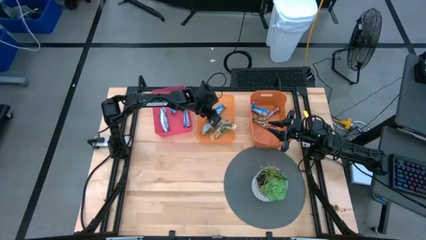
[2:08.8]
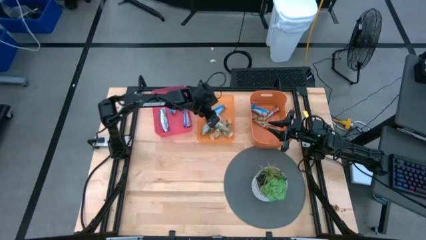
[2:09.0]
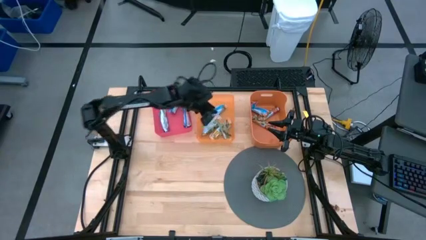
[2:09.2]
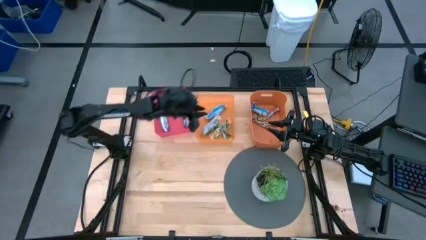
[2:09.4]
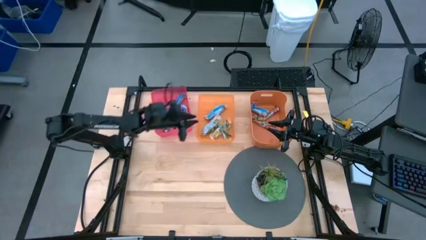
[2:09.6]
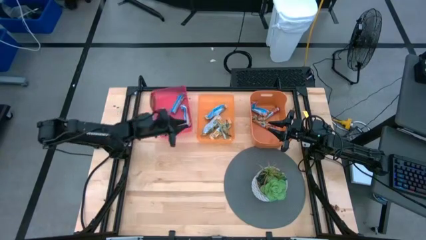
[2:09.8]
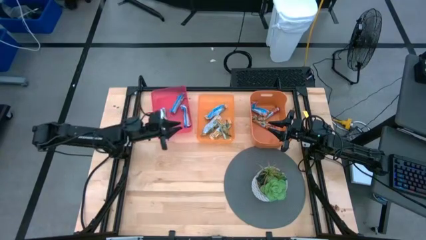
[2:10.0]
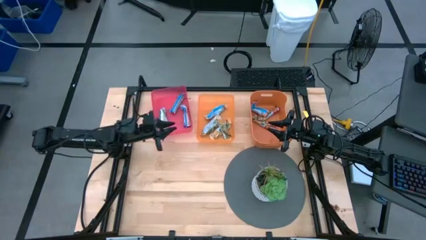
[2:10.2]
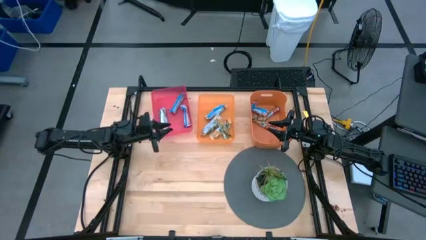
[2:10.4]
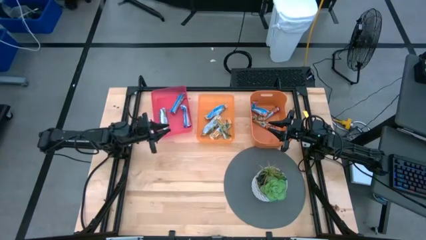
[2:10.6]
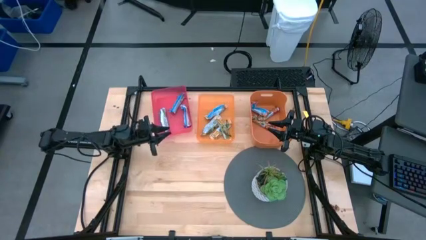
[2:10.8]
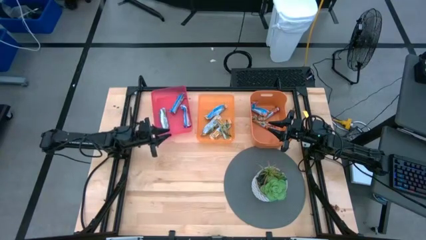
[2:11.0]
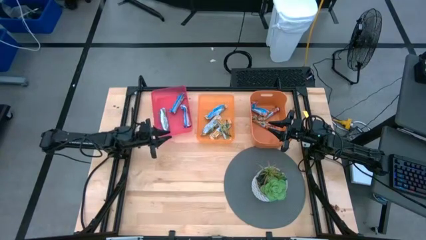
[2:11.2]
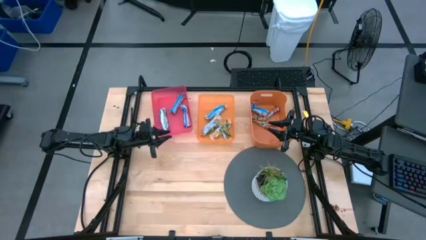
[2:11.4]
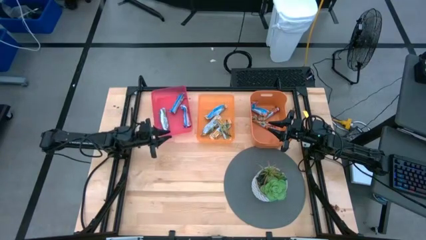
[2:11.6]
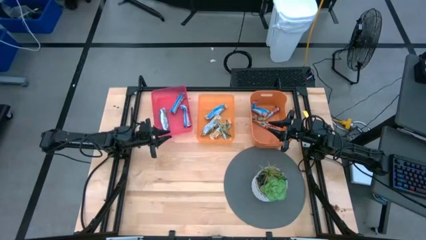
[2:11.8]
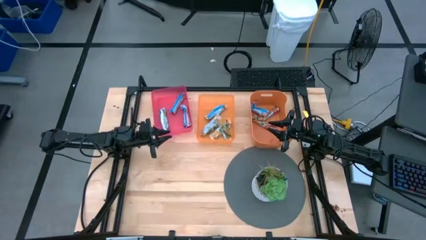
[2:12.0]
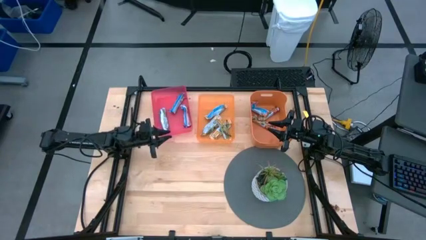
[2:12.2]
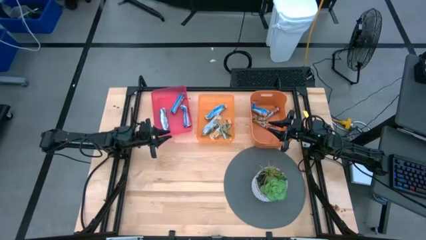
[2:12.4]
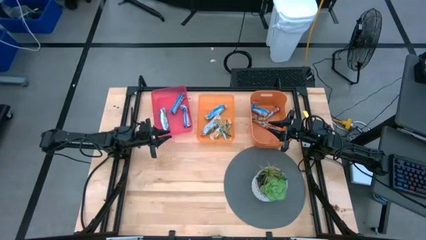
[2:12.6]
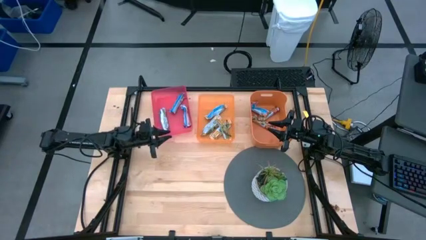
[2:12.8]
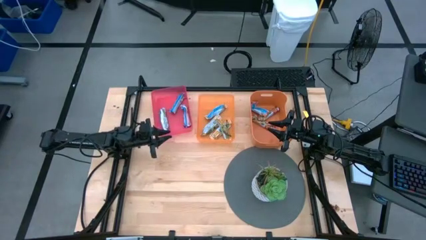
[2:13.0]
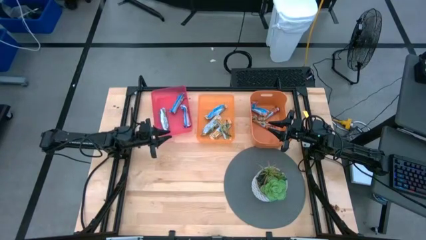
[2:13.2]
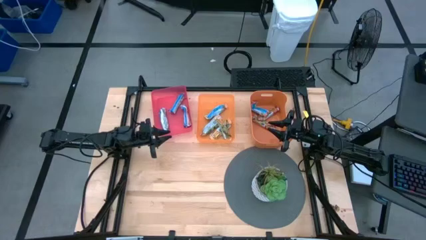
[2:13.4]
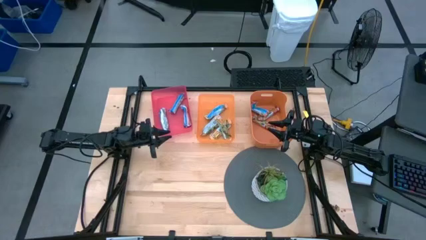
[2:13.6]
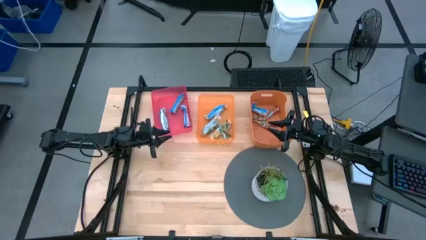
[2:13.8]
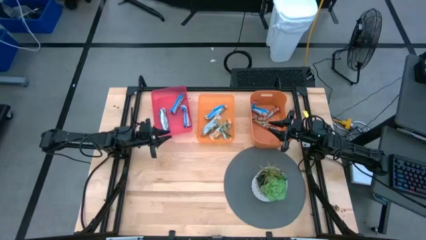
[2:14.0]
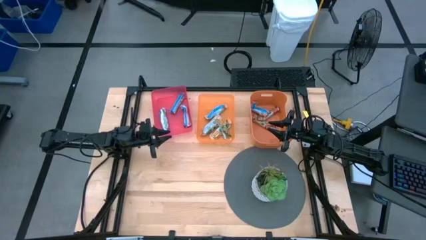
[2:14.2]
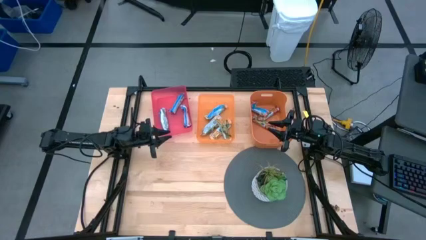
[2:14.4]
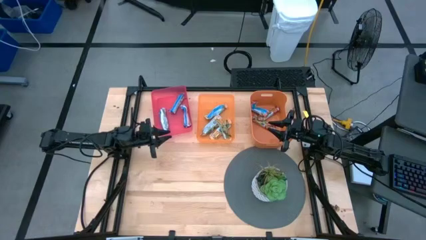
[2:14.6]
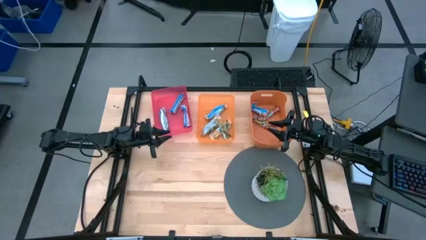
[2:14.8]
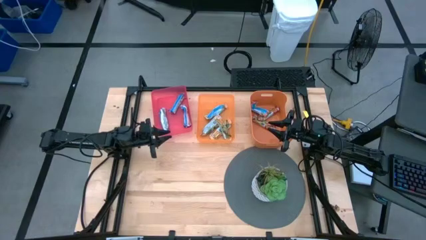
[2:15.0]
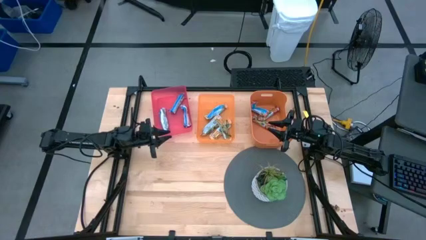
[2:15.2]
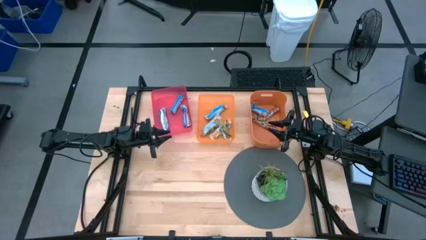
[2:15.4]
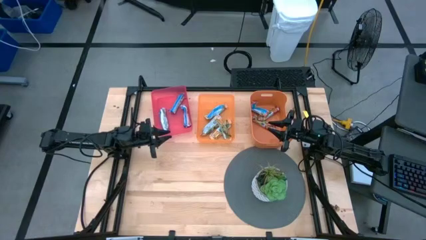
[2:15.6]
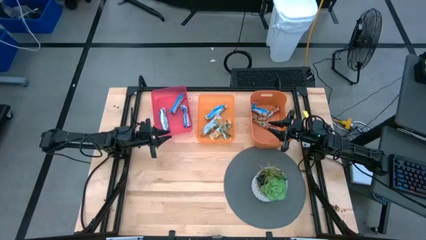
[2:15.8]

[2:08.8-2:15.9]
Task: Pick and place Granola Bars by type
Return to Home Position

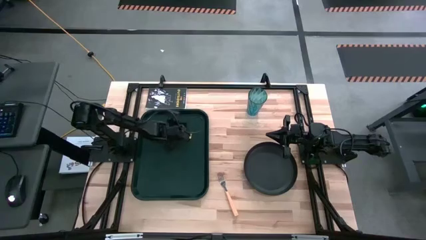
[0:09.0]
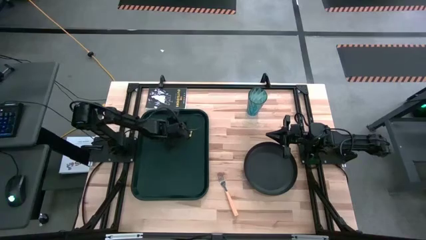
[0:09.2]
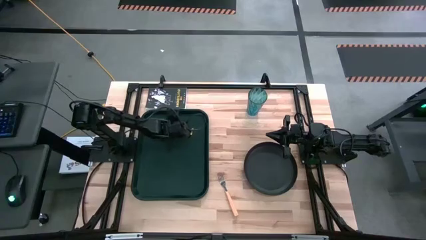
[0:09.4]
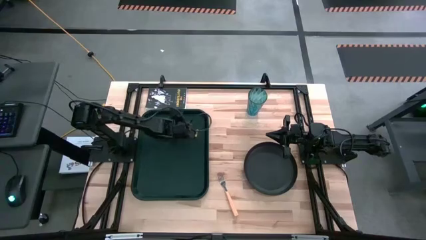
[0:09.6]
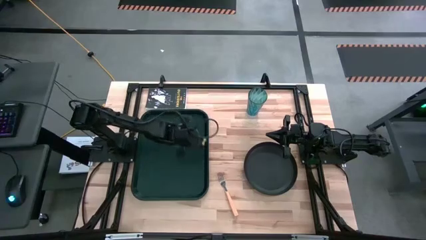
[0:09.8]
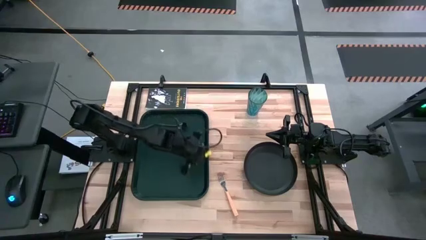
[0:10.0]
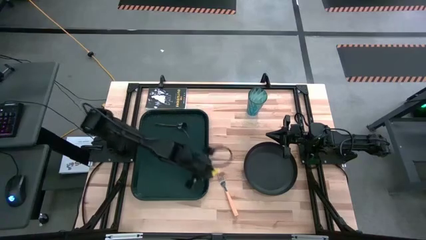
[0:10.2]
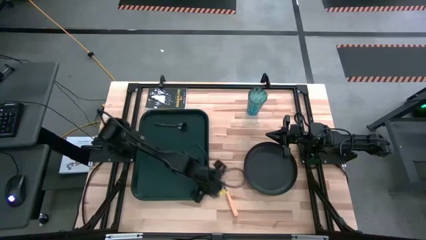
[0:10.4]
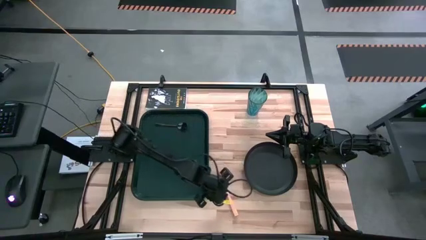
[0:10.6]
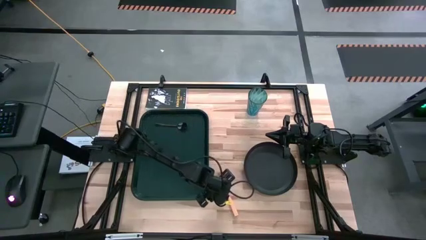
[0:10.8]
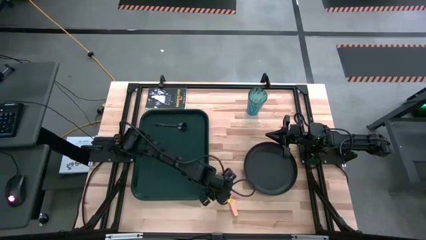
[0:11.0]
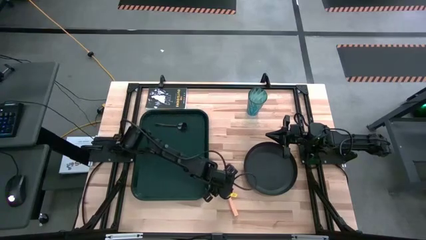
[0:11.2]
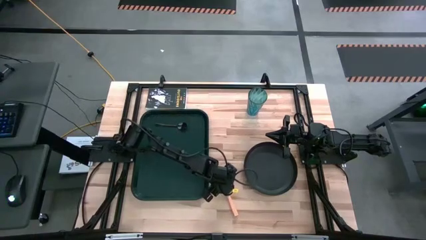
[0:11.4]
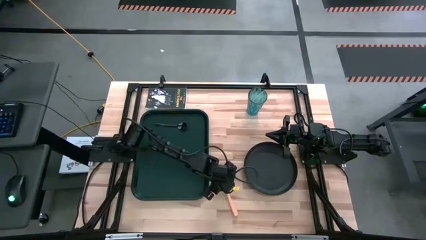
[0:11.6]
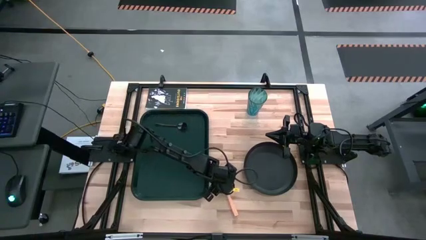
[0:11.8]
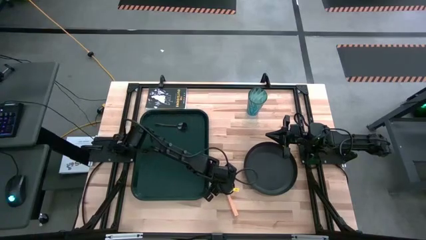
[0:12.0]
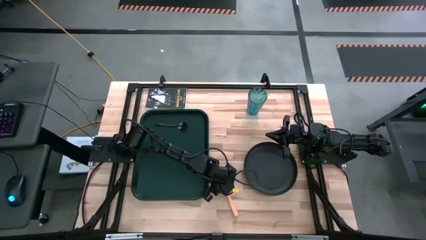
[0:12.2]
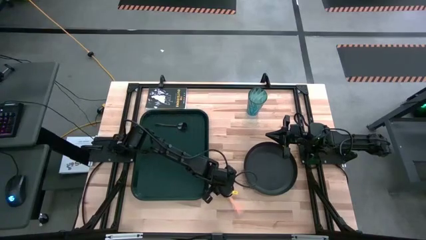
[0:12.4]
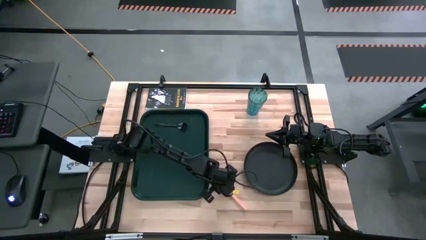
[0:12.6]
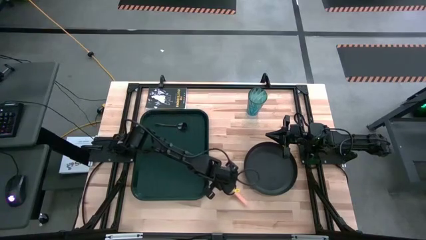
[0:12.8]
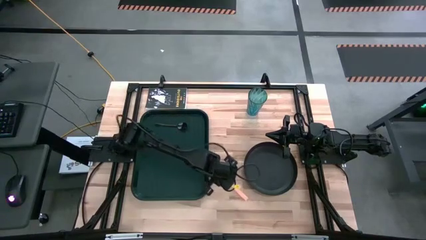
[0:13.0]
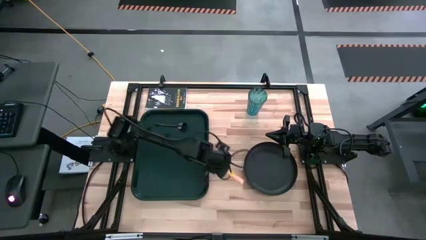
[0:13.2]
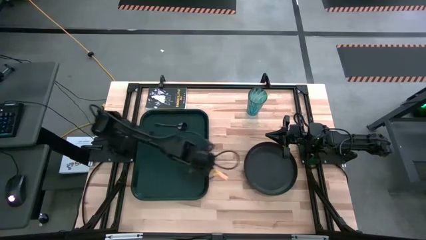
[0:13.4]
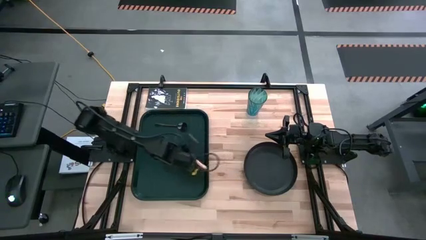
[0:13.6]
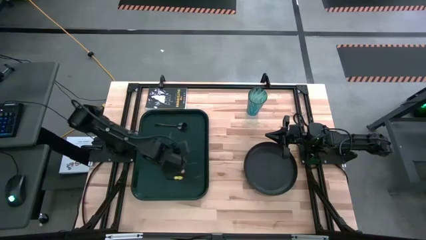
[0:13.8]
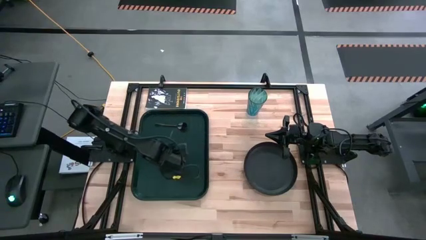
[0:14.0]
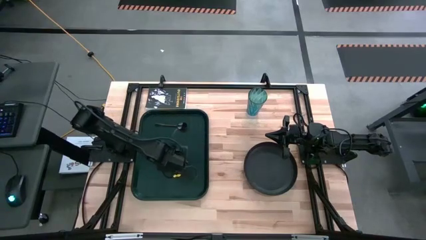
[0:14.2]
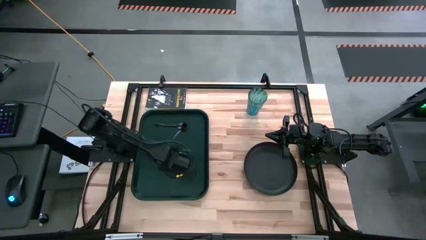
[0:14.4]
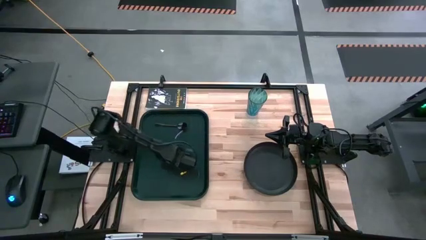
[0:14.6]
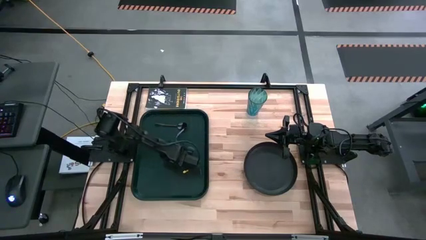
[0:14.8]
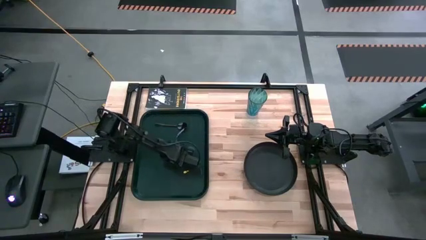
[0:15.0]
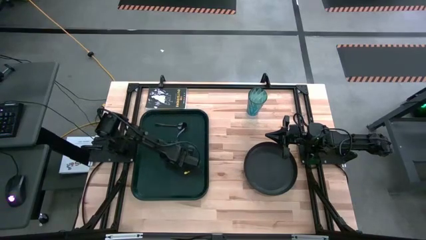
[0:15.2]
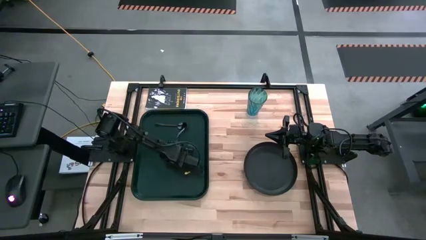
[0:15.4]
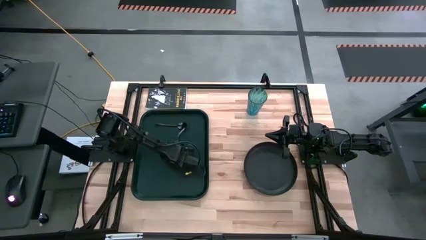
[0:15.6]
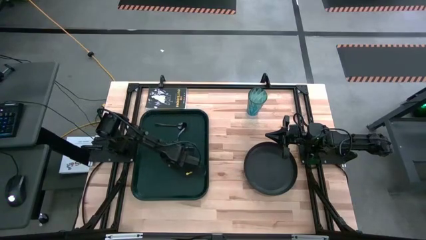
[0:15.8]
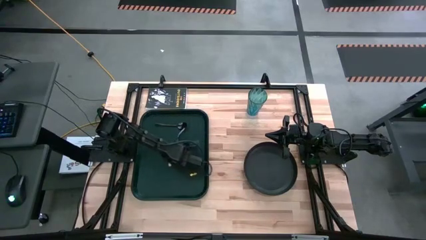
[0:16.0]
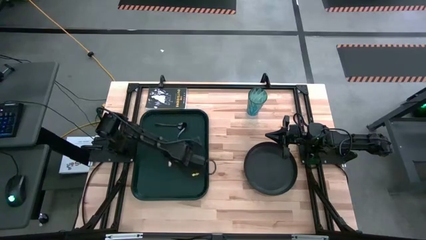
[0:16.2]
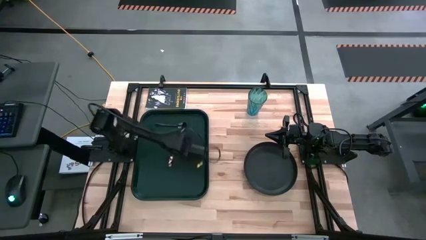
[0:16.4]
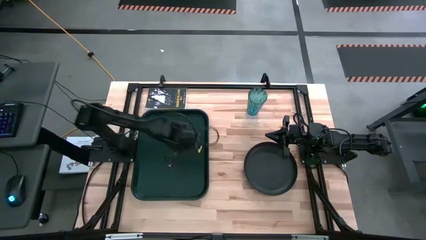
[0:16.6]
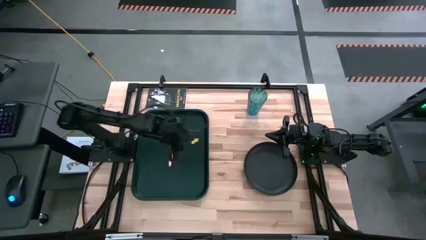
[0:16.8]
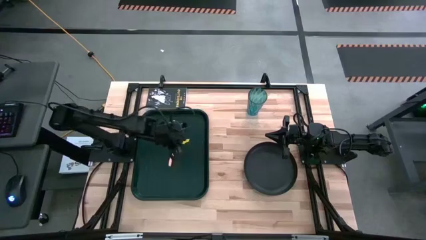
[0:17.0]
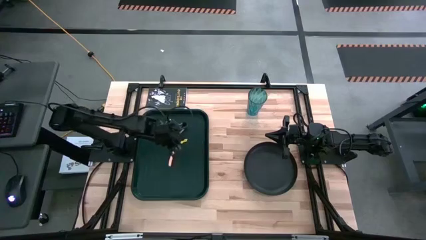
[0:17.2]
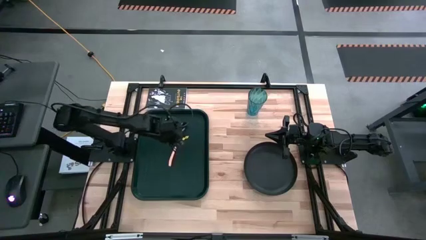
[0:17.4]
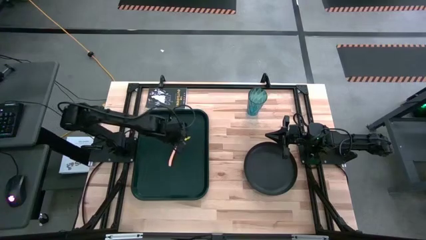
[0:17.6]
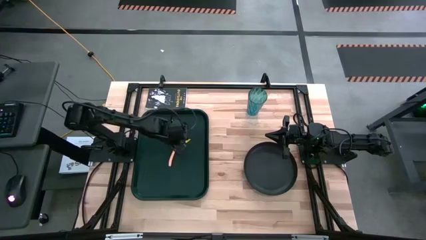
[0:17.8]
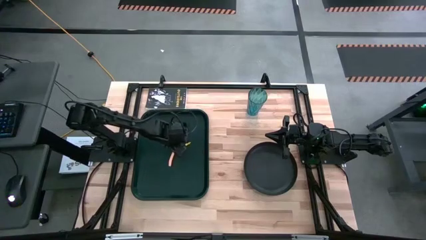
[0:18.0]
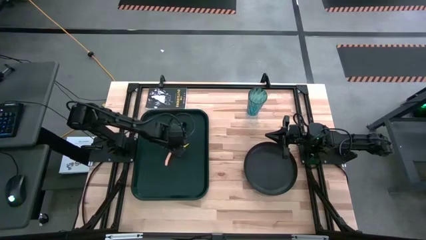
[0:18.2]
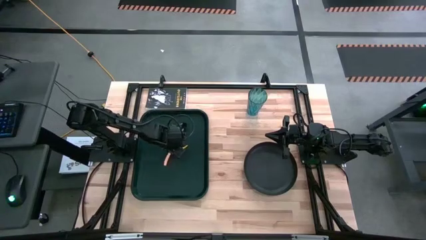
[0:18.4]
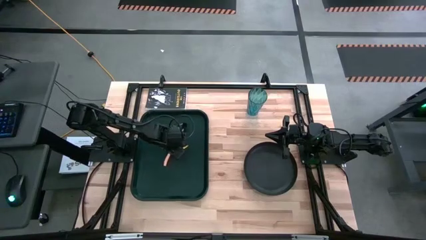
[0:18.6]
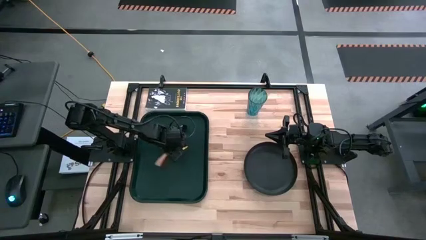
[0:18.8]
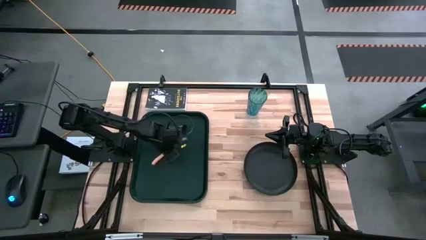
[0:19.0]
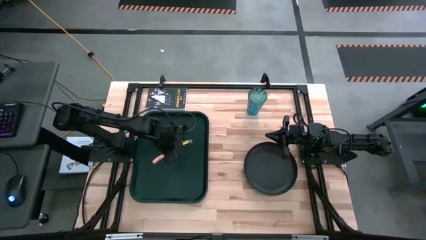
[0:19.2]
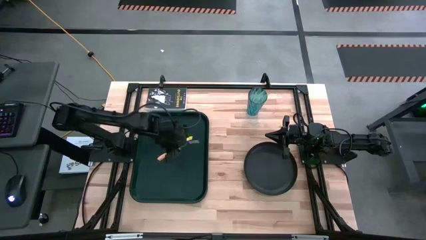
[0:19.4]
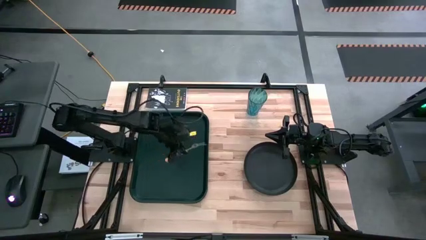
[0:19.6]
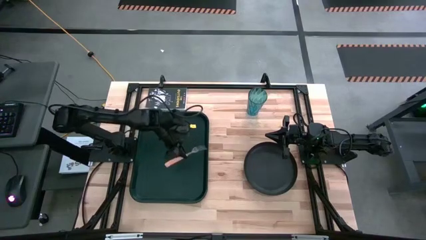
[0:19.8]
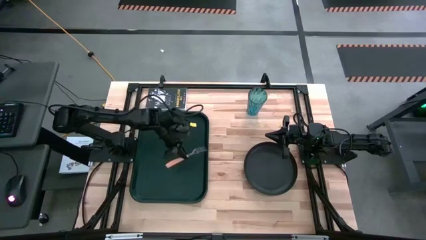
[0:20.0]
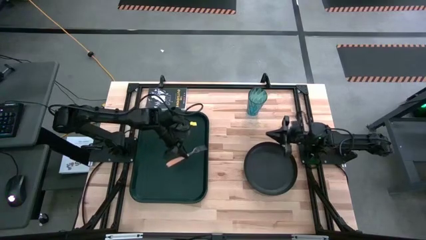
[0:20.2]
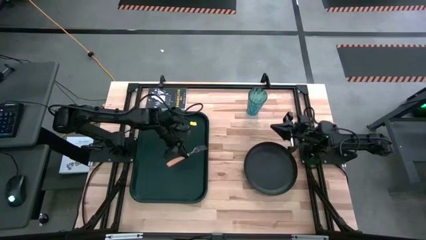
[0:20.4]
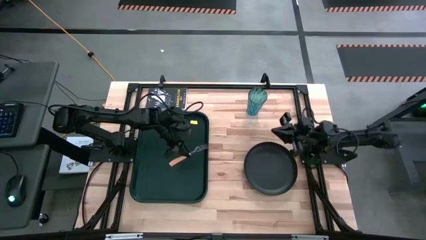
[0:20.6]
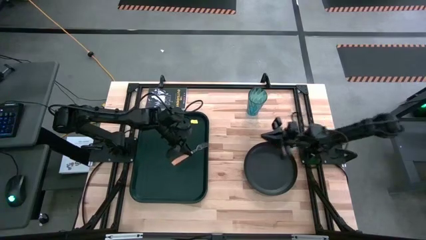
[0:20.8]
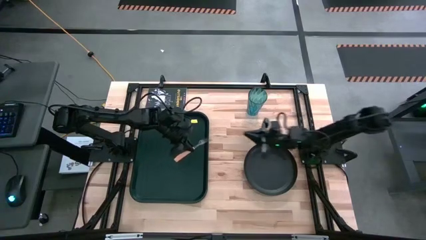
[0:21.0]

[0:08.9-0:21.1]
Task: Pick and place plate/cup/fork/spoon on tray
Put the fork on the tray to the right side of the spoon
